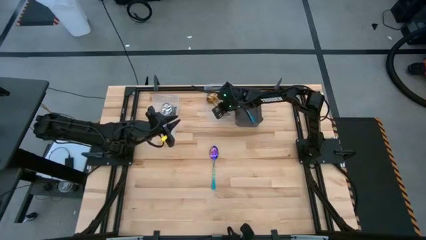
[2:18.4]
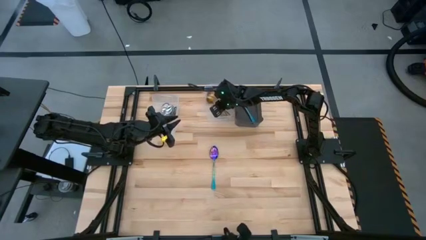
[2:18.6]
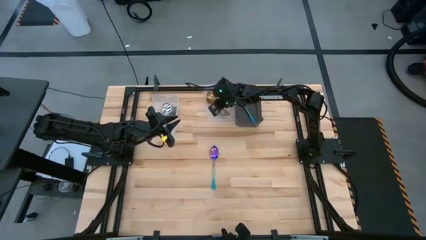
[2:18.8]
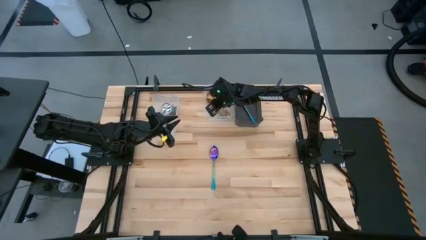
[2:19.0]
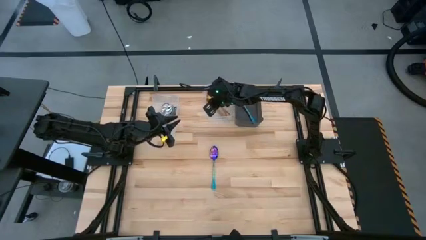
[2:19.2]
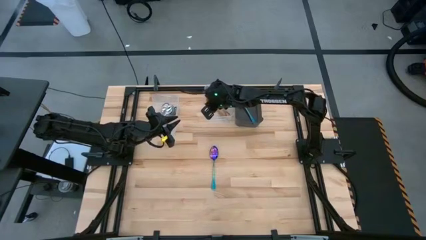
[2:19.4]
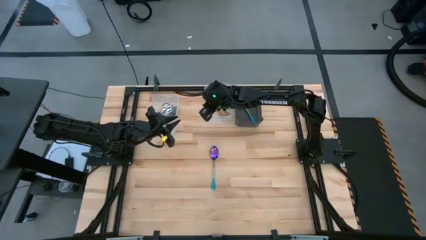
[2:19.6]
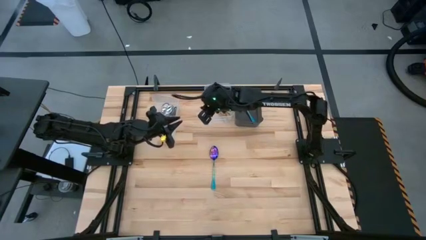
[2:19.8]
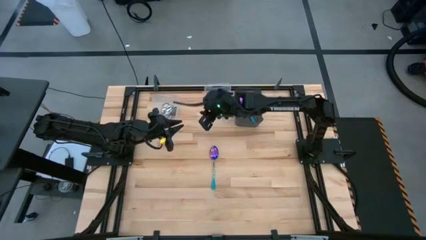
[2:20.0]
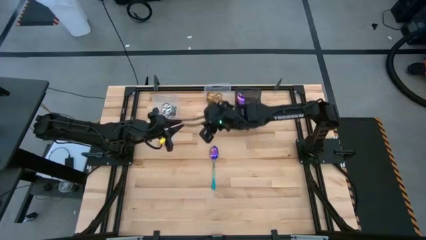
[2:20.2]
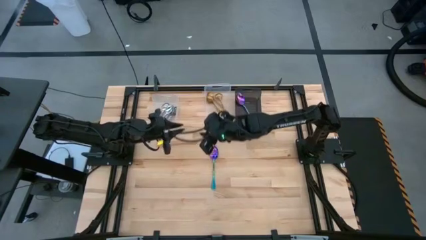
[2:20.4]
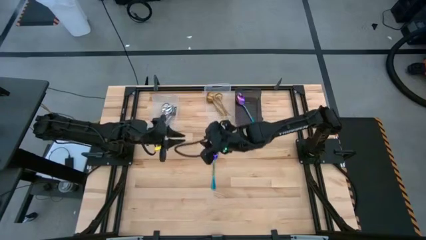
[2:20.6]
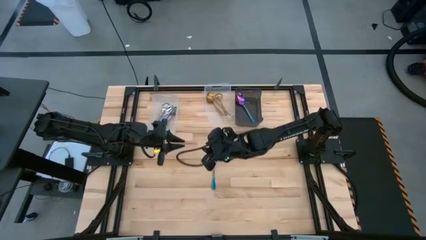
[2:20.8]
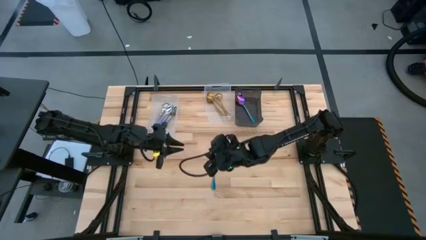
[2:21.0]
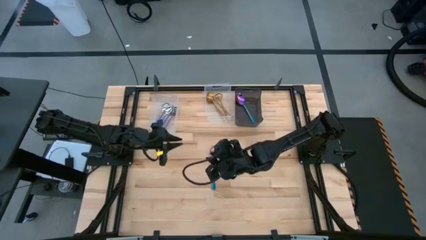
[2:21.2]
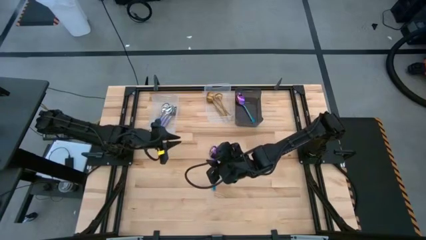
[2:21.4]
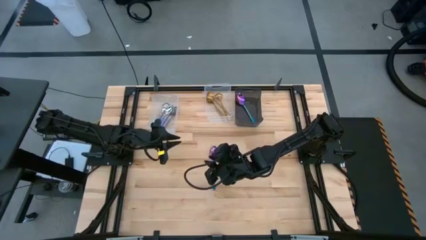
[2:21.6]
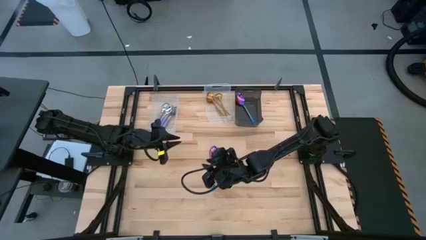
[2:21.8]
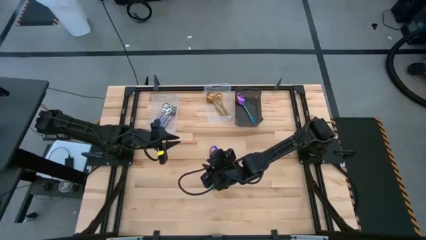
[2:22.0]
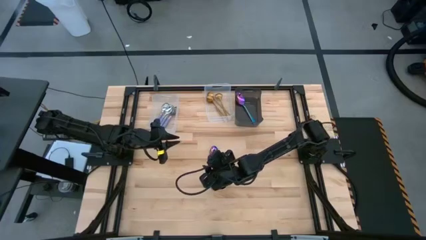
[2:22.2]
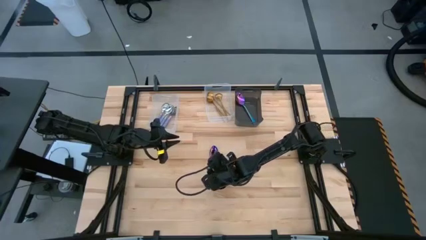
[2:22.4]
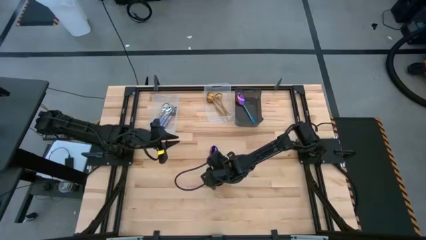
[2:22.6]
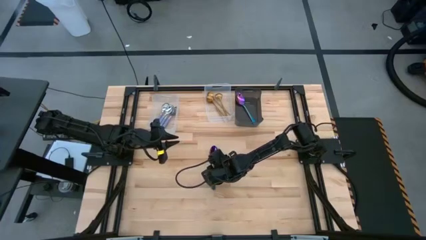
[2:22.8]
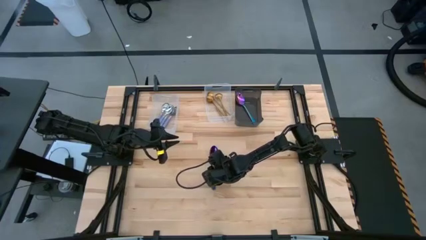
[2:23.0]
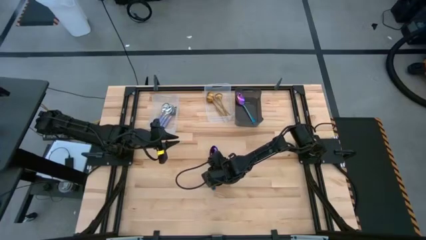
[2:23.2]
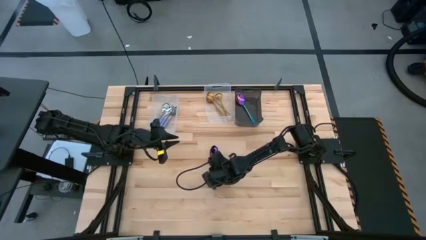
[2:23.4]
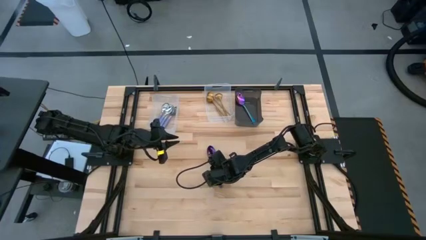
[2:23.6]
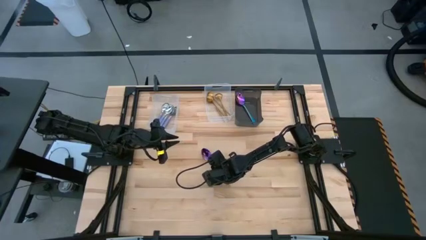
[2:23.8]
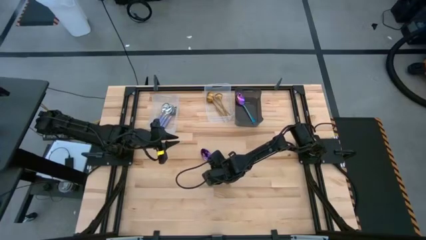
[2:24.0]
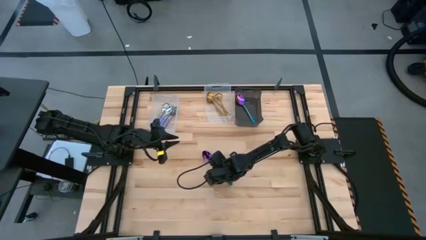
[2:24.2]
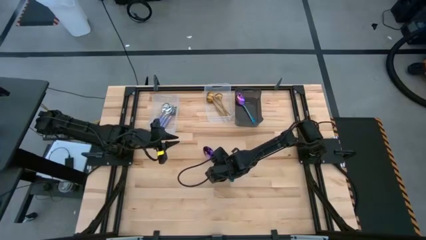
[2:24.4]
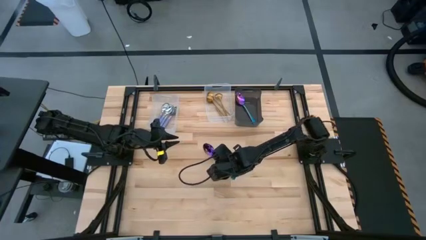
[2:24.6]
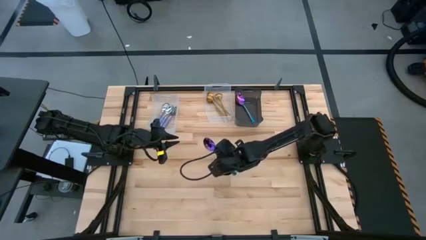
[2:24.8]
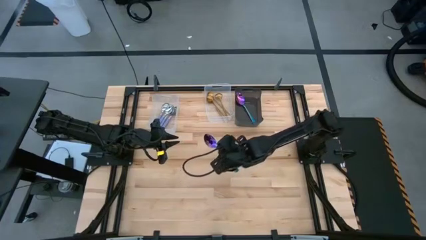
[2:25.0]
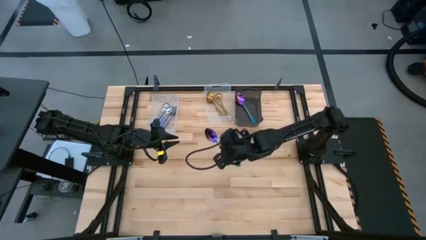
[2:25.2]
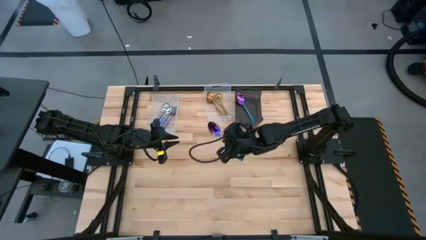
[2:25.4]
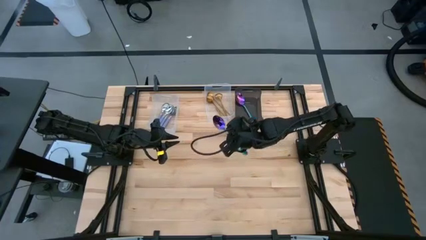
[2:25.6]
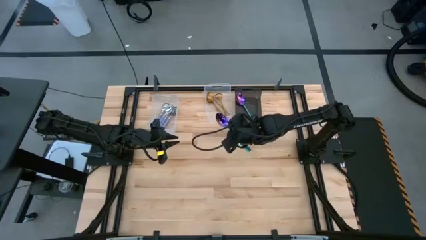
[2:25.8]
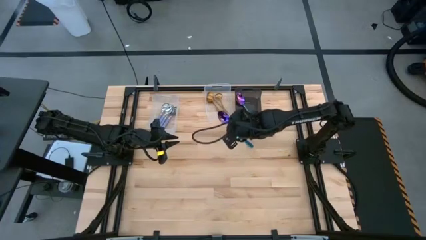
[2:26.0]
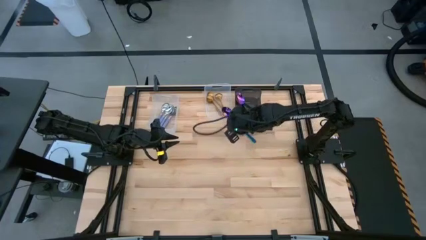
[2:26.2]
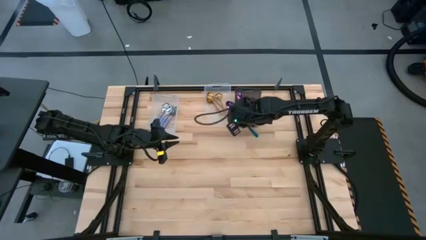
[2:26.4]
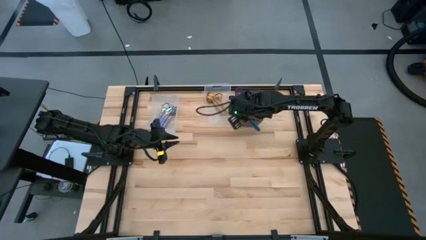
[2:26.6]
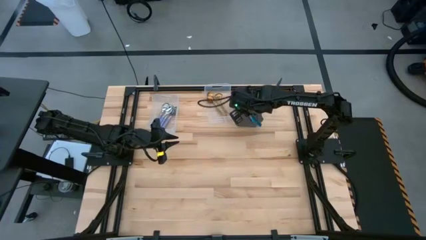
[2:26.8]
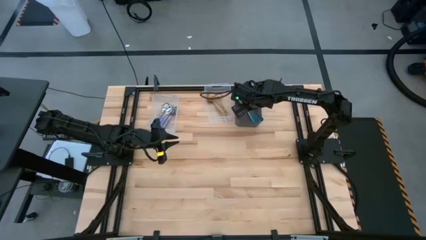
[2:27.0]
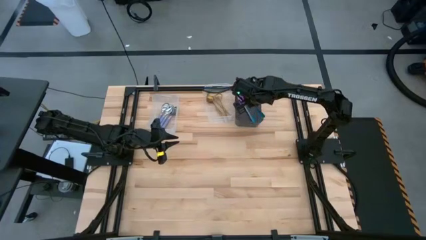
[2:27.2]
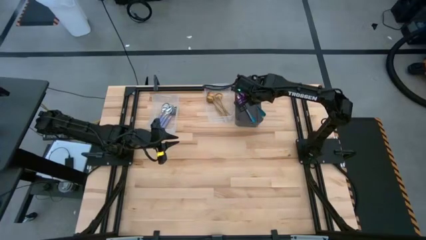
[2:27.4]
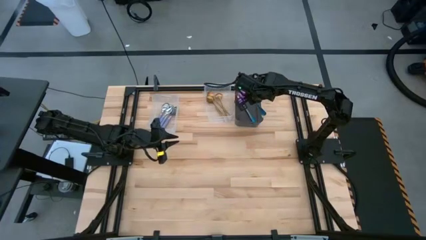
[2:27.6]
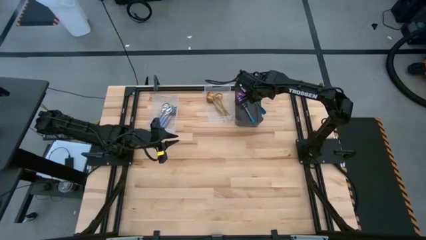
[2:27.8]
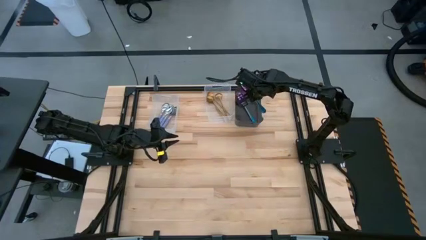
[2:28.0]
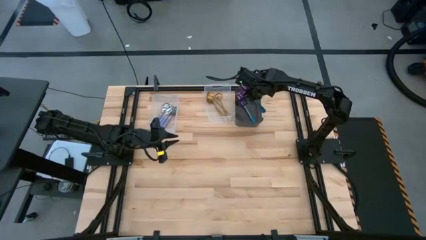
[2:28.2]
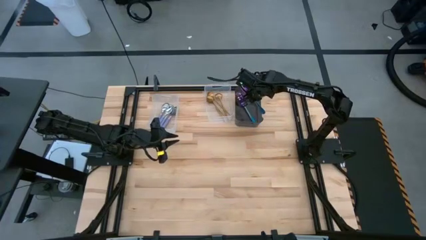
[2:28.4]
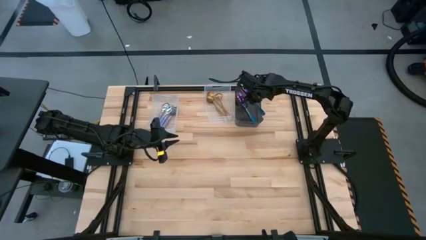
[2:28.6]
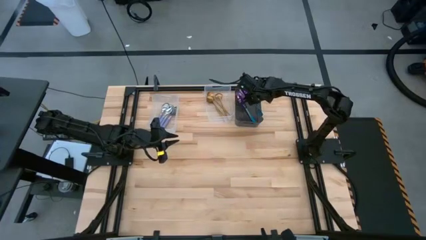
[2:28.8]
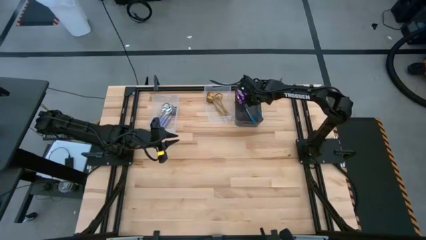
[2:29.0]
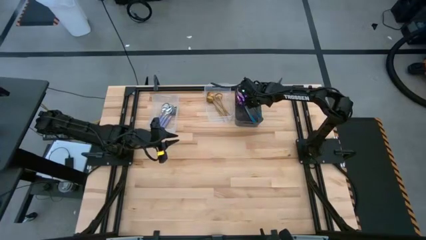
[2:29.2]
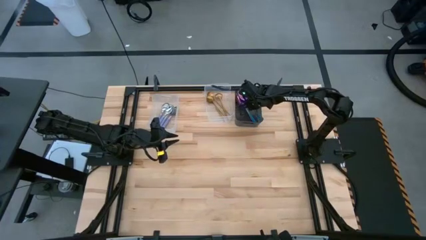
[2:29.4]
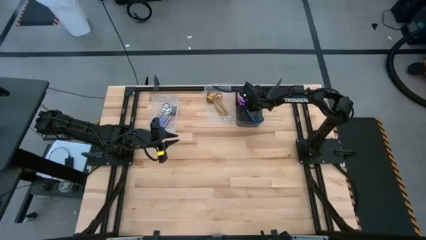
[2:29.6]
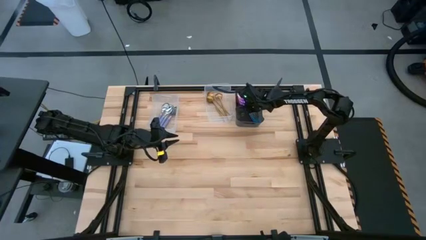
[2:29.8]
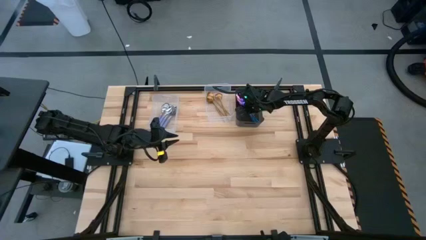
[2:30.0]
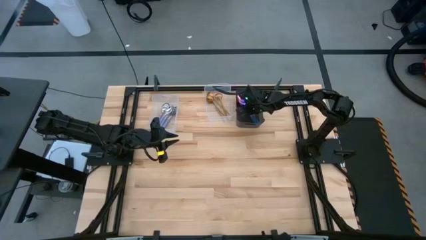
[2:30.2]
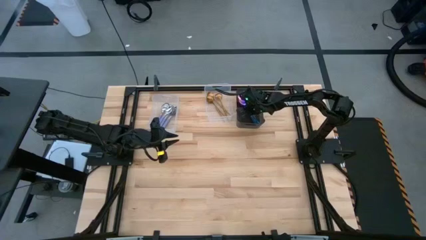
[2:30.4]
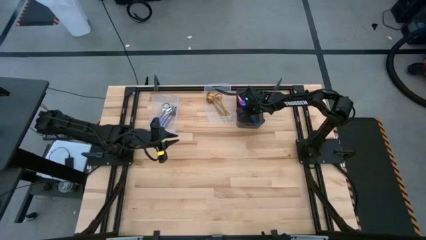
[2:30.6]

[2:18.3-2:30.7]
Task: Sort silverware by color (type)
Put the blue spoon into the black bin
